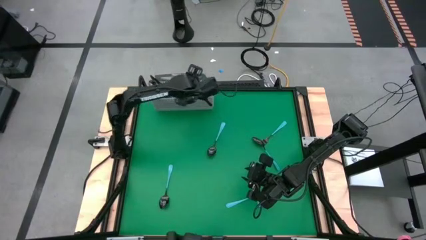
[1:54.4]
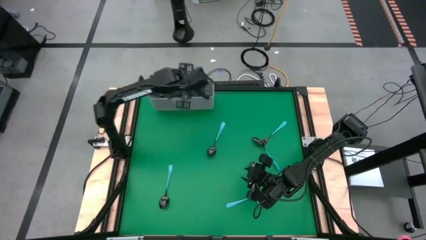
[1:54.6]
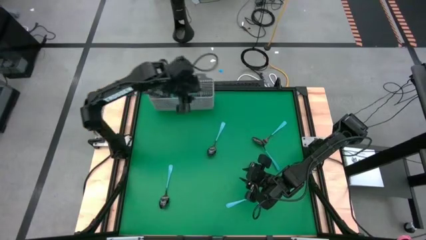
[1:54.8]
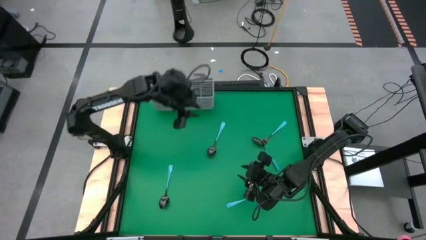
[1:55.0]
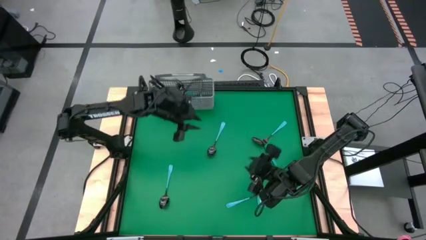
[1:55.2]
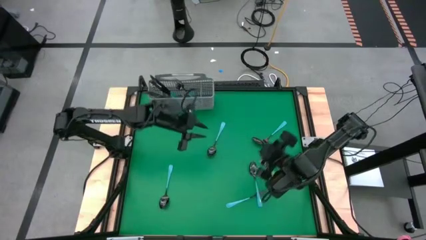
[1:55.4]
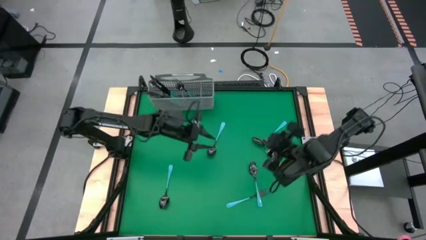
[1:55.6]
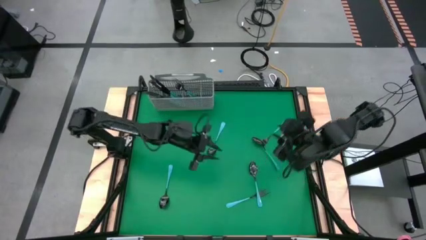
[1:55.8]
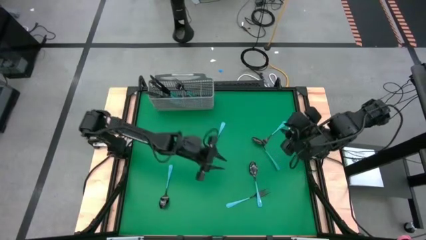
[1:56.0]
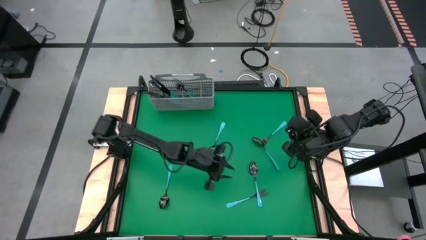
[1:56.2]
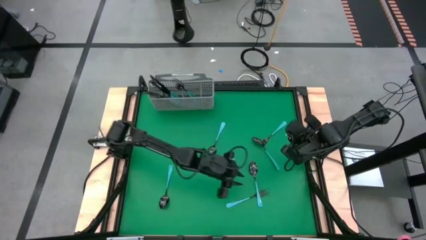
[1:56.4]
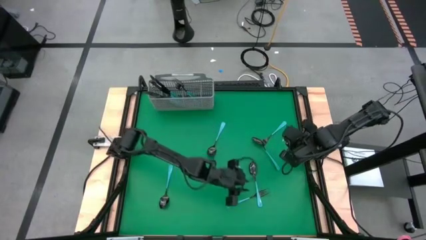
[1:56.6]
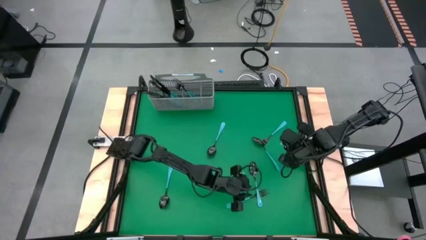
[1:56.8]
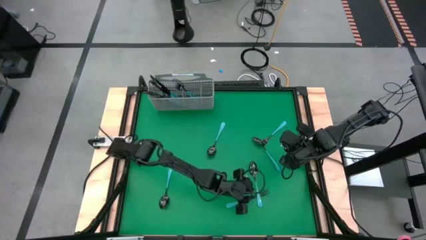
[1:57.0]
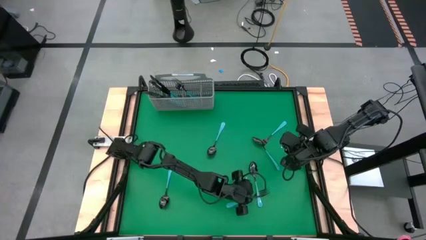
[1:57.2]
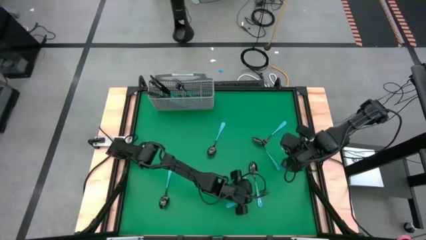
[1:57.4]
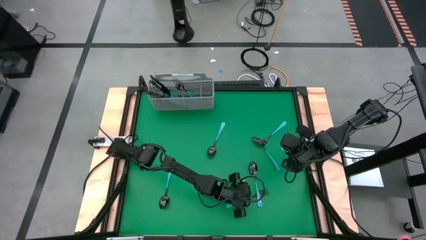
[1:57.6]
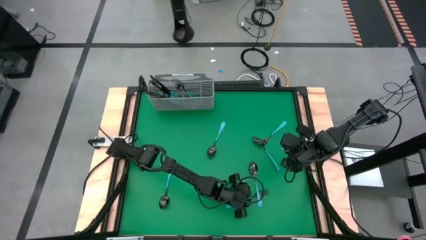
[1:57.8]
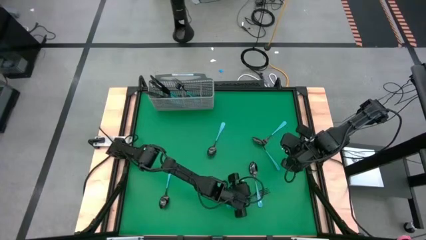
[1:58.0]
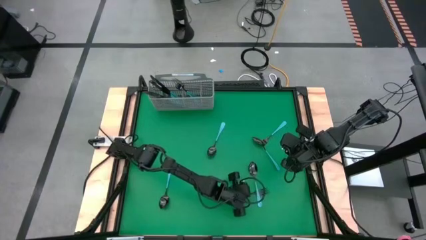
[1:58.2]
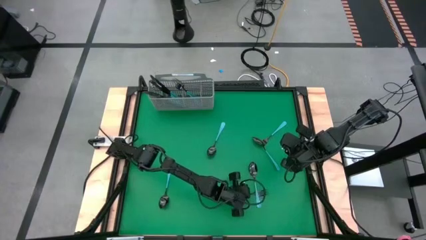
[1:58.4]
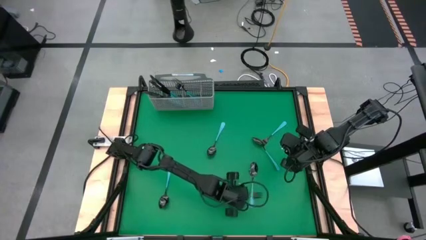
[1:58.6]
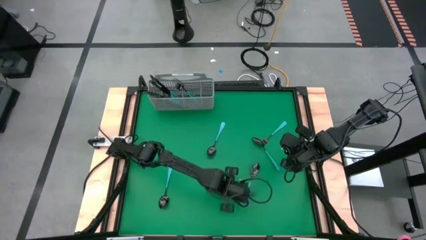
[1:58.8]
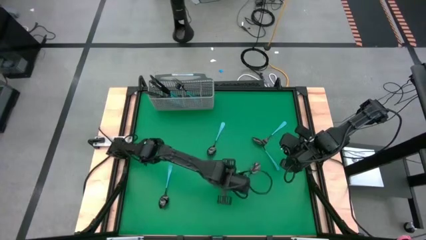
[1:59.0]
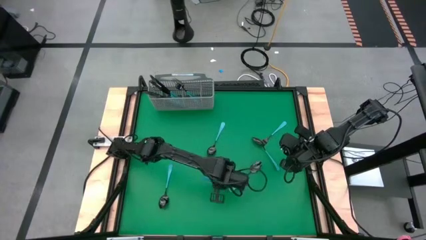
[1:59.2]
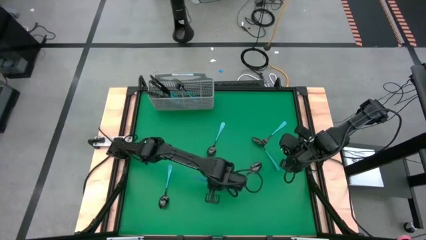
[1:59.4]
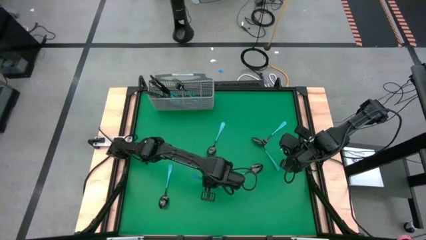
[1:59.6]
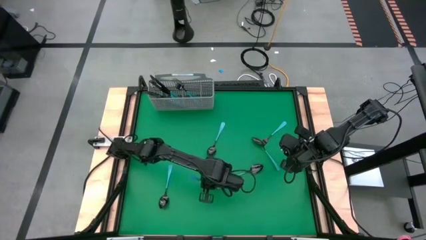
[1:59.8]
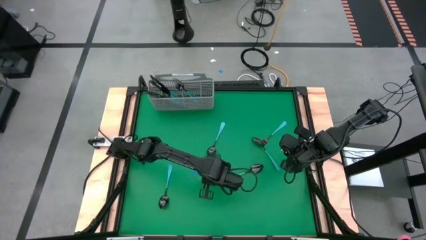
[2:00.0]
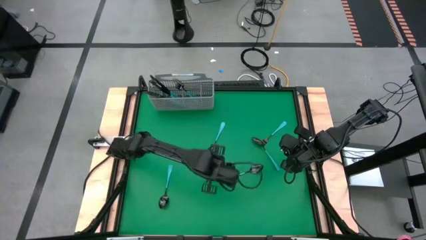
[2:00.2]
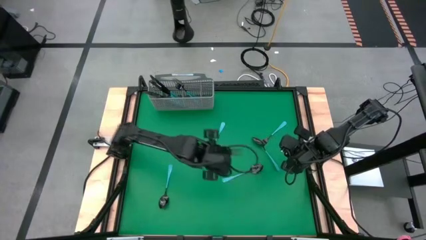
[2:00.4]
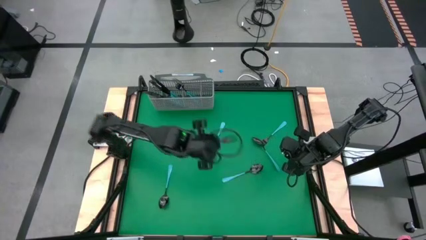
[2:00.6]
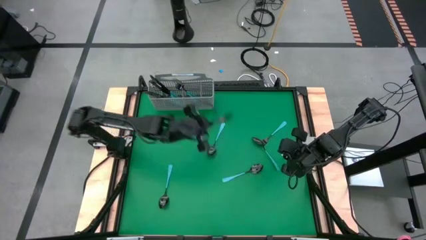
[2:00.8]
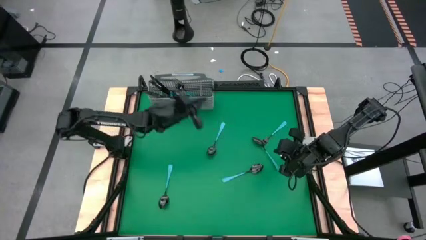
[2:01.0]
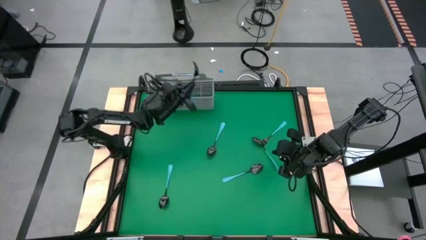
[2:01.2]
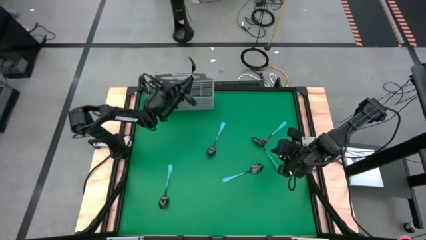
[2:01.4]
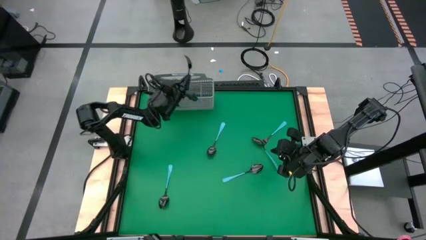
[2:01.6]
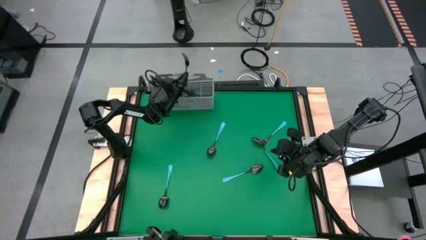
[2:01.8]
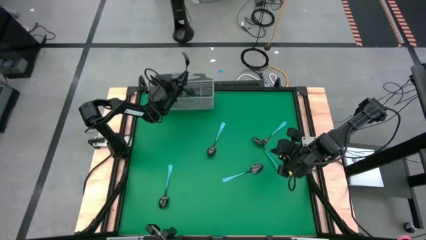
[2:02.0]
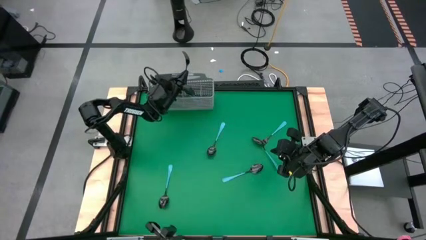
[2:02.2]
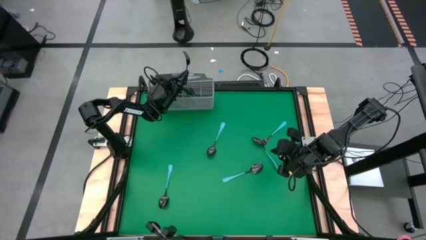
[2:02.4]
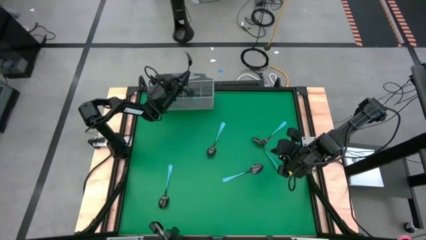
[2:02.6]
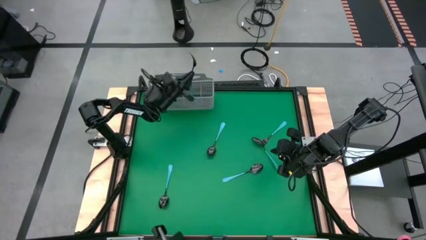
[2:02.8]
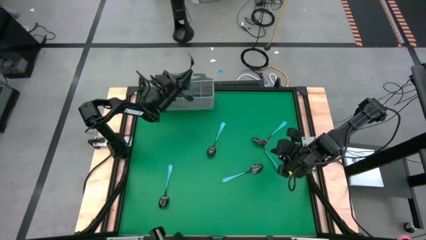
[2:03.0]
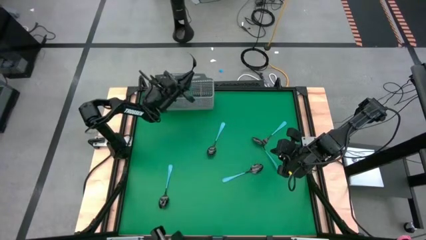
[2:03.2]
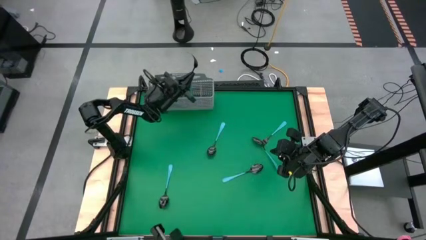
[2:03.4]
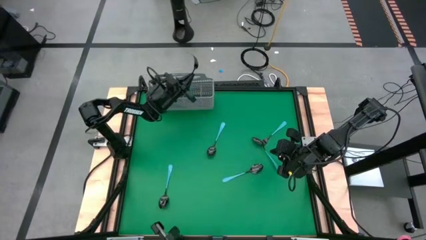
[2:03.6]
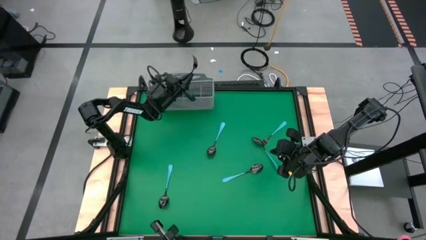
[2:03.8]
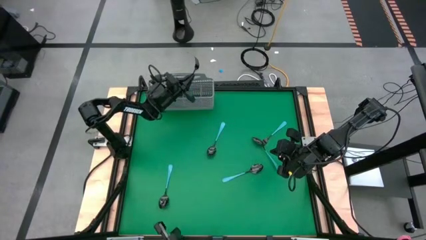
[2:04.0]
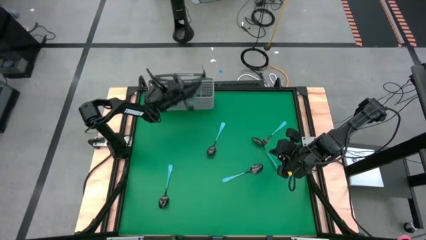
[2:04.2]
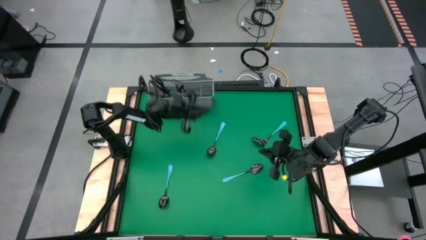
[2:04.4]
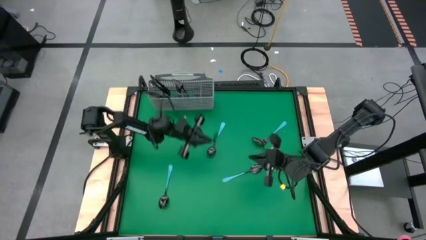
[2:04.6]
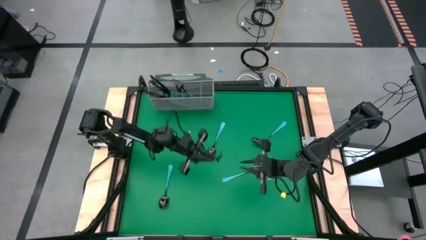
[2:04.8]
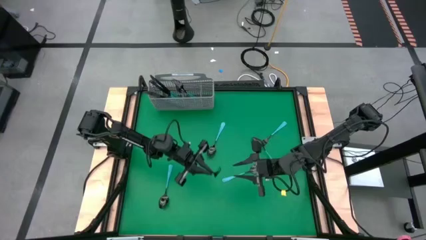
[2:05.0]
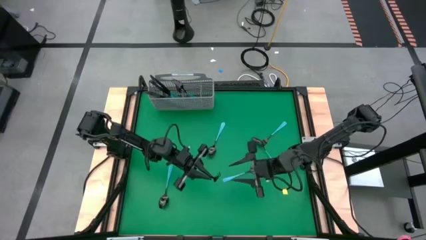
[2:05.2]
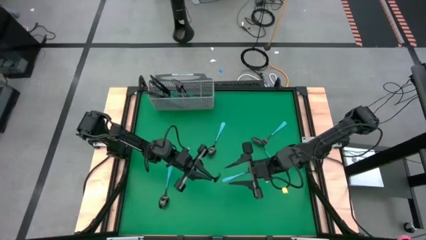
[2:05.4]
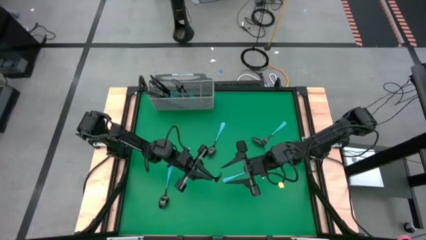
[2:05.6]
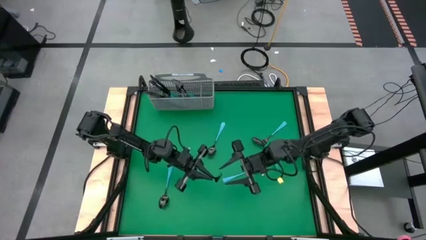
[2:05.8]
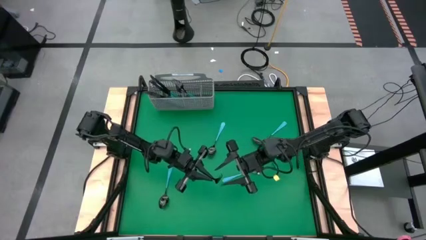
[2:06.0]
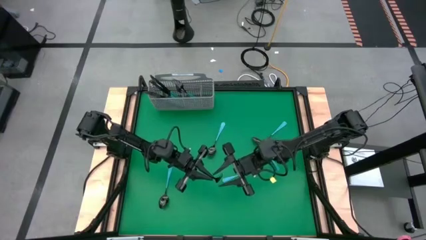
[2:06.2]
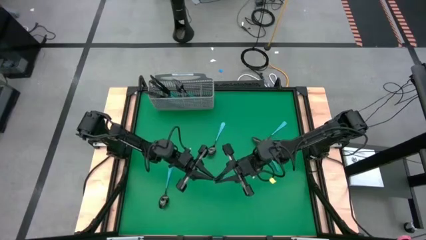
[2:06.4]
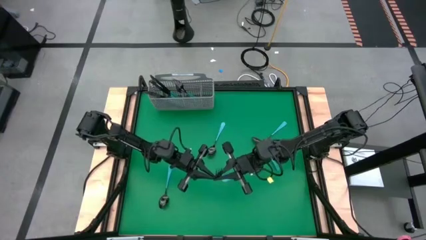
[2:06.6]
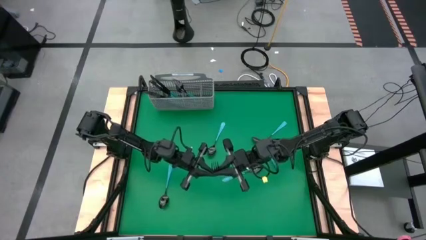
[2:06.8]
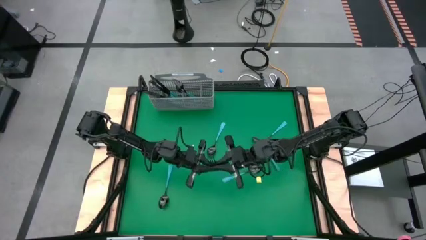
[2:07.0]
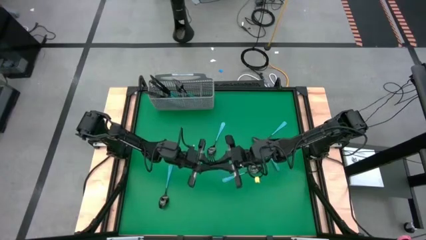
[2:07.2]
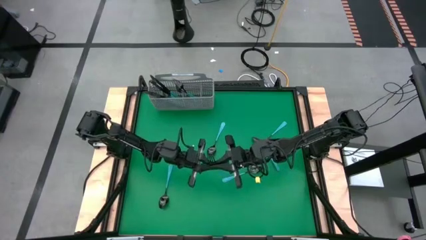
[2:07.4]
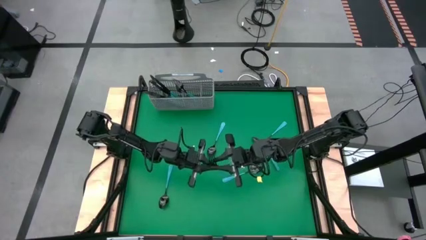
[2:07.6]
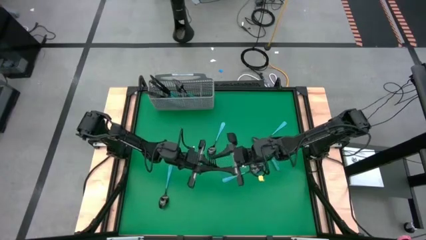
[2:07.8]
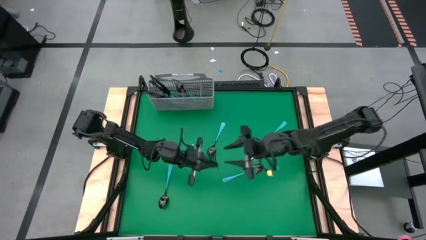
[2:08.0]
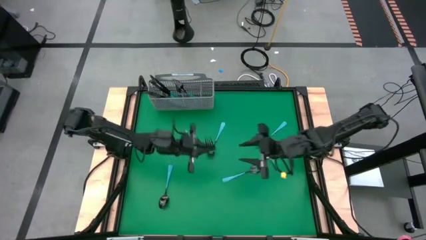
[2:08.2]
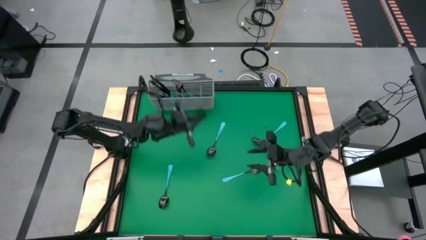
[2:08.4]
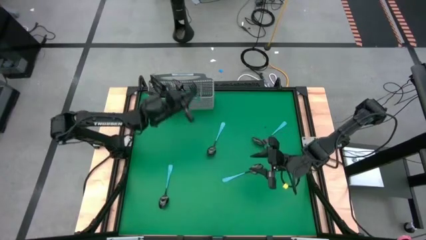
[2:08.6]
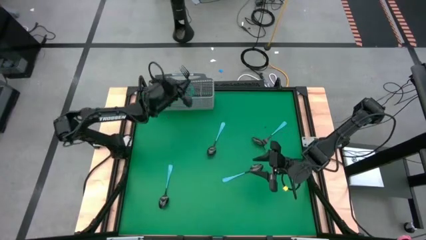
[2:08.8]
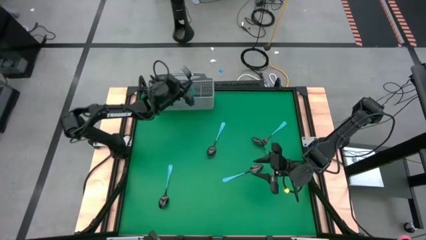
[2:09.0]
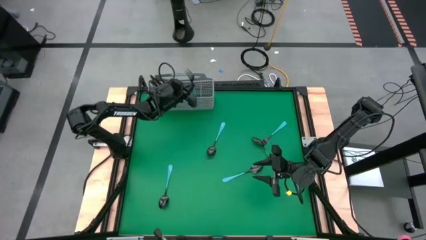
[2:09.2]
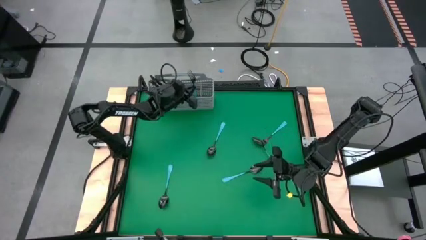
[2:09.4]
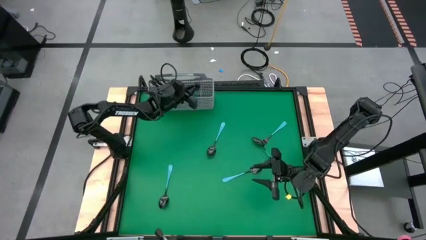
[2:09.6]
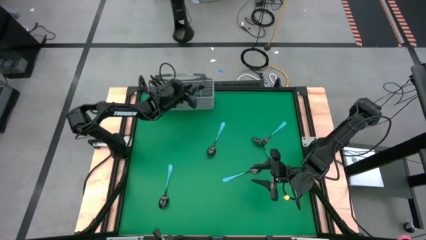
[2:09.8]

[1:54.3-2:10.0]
Task: Sort silverware
Put the fork into the silverware rack

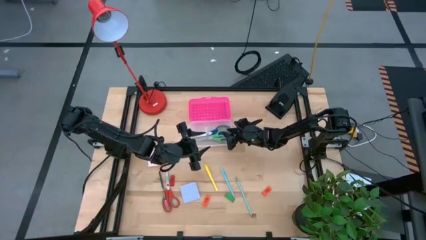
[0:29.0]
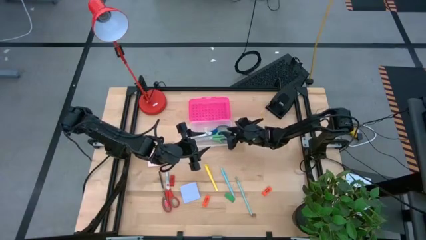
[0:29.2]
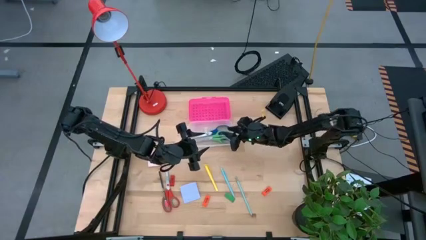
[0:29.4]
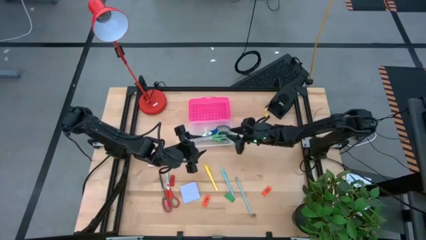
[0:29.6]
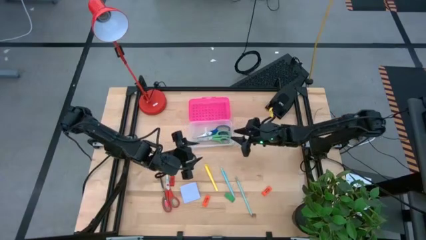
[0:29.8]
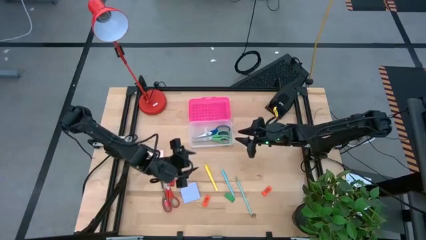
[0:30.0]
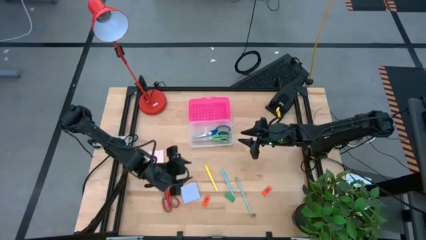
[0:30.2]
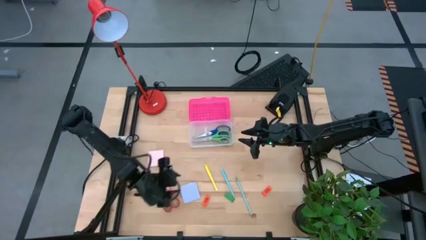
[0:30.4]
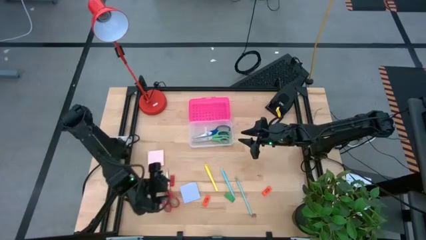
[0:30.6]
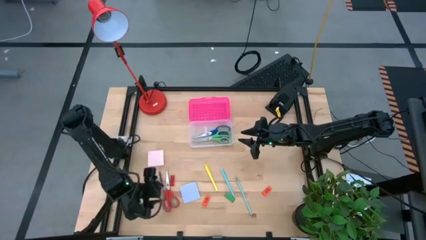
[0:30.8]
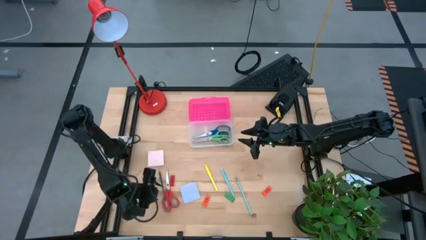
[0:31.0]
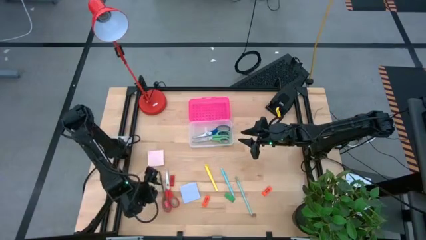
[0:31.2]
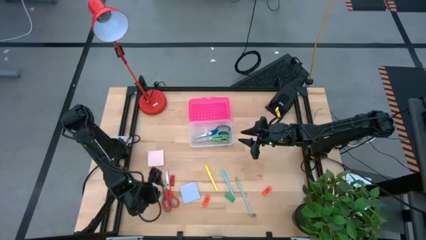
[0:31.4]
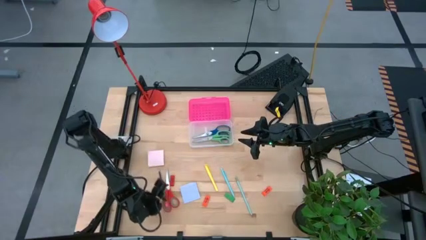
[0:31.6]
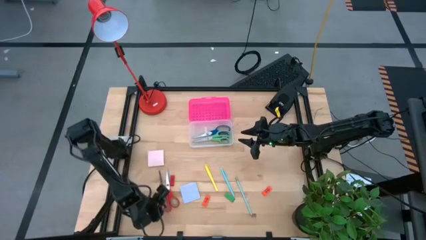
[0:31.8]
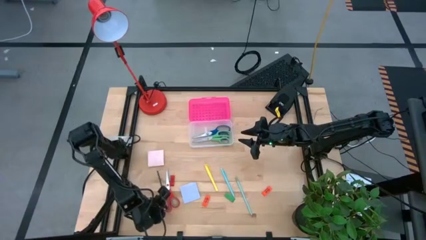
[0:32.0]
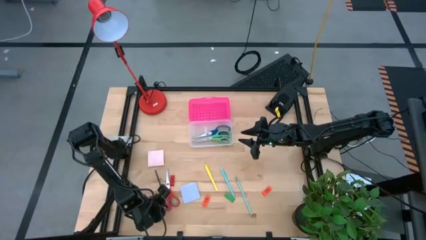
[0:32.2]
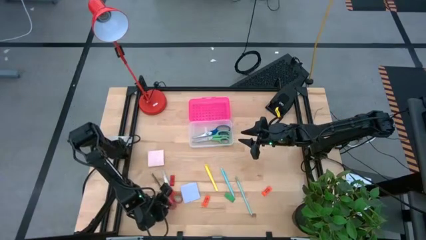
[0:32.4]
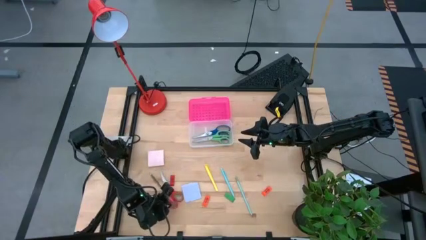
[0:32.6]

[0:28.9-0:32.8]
Task: Pack school essentials
Put the red scissors into the pink supply box
